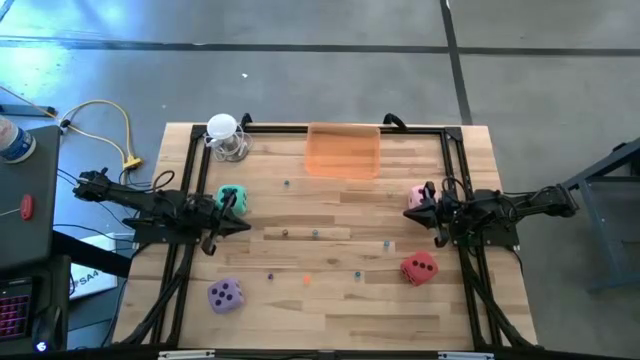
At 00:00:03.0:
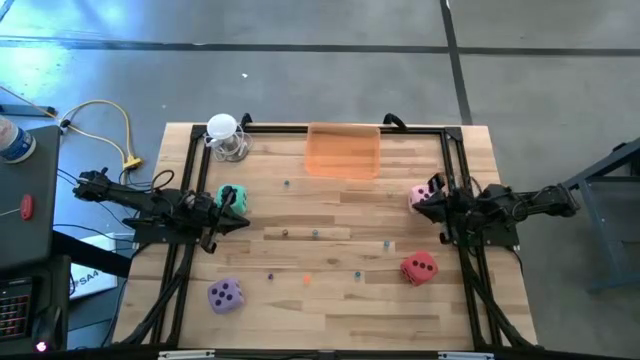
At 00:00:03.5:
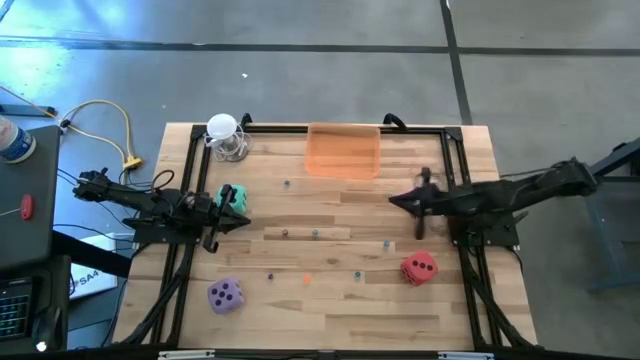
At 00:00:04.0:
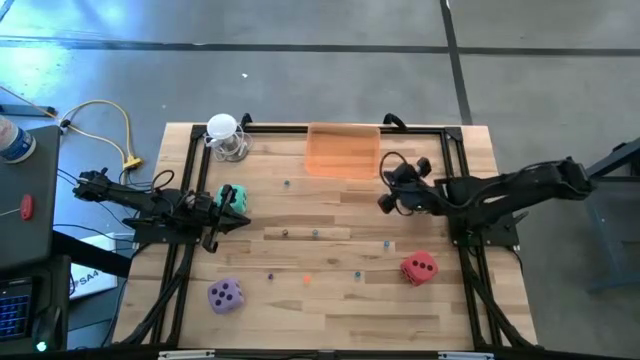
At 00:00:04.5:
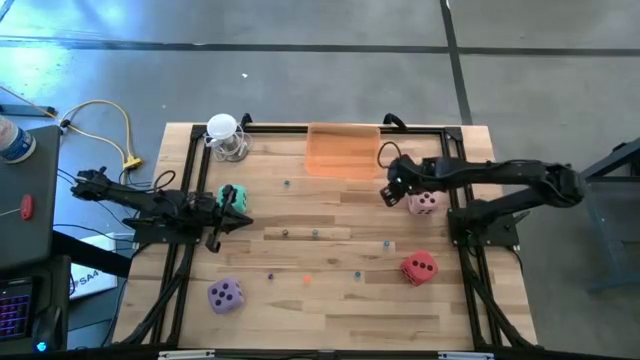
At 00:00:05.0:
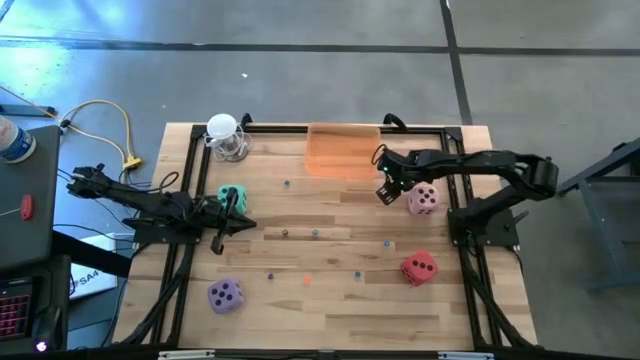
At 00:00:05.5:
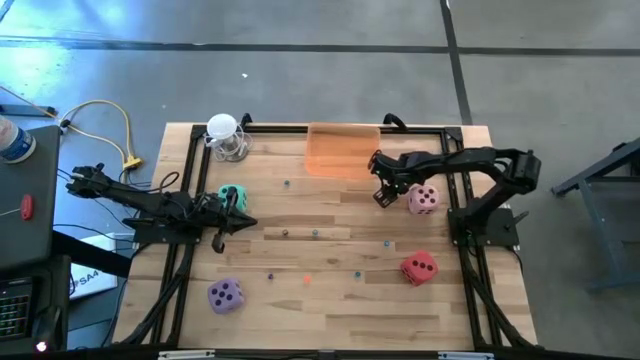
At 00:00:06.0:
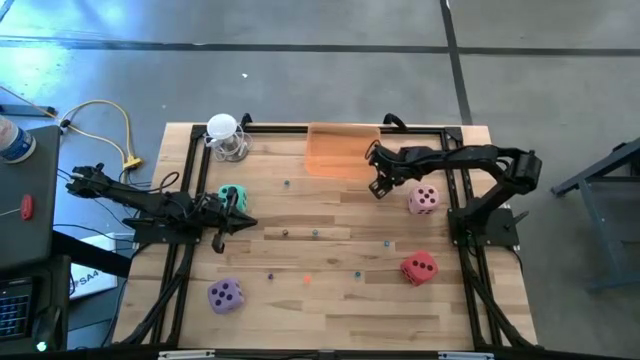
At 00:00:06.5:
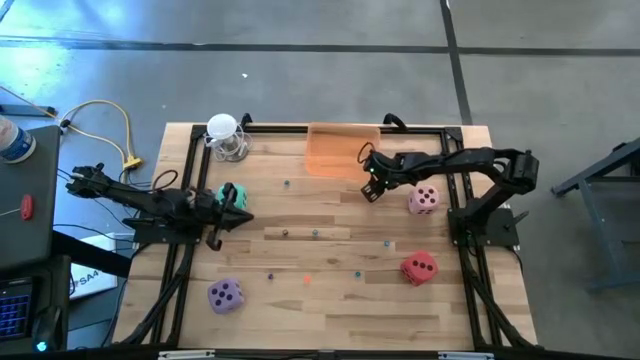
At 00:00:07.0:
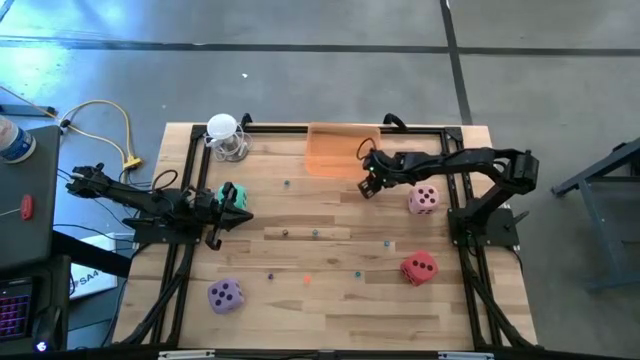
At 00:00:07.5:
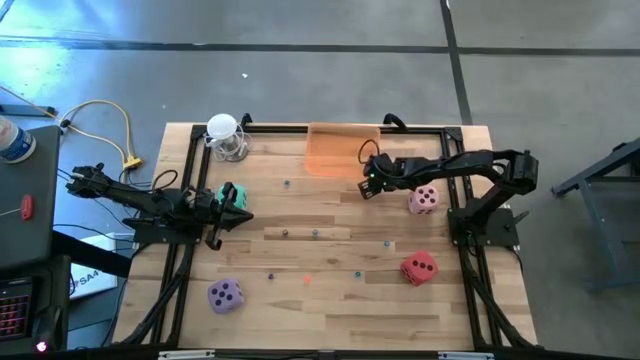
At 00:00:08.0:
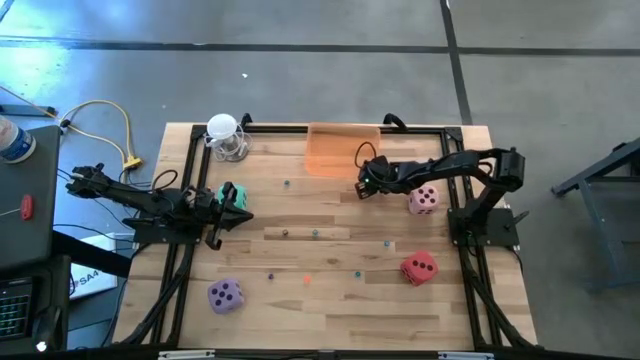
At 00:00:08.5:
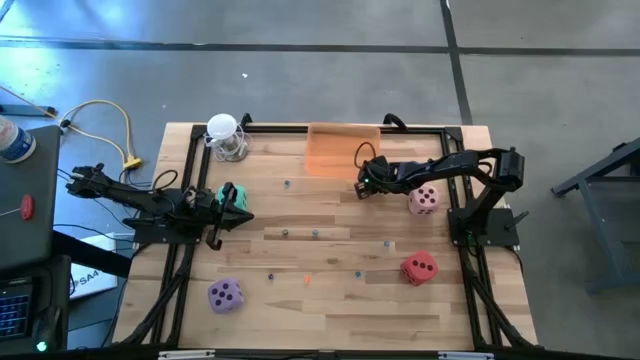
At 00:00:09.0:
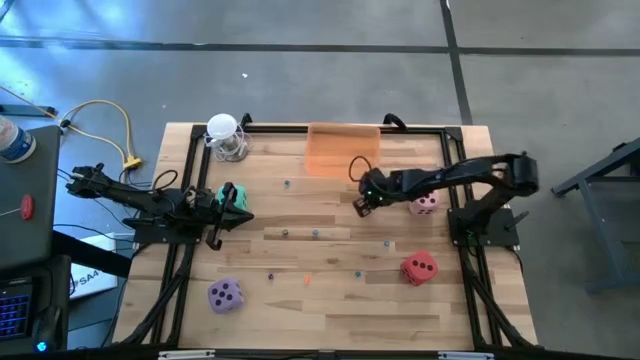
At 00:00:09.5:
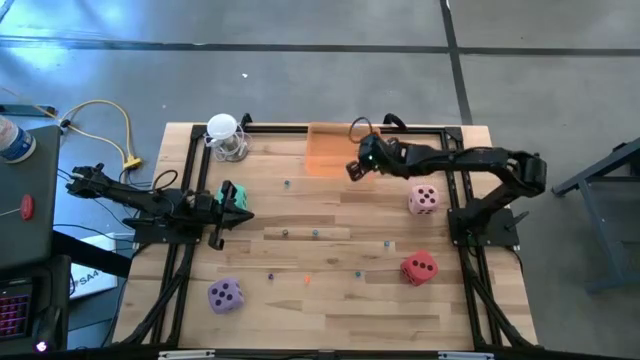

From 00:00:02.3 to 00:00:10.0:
Task: Pick & Place Dice
Put the green die into the orange bin

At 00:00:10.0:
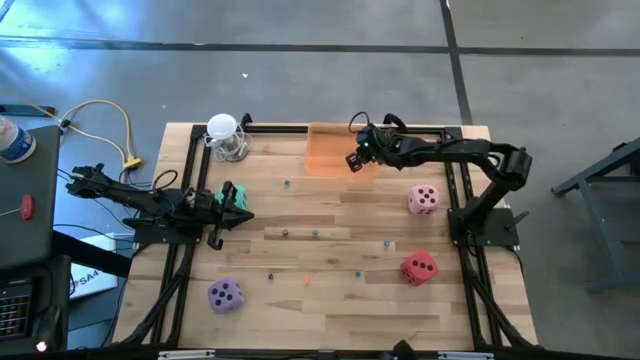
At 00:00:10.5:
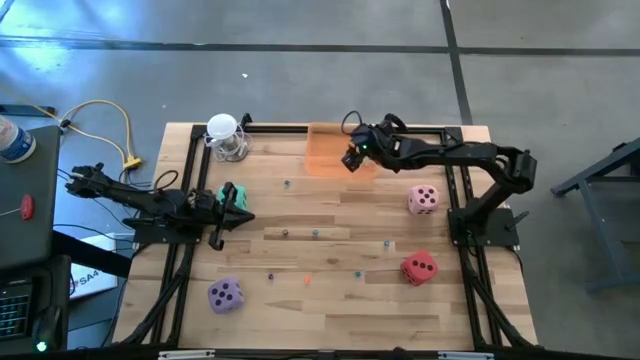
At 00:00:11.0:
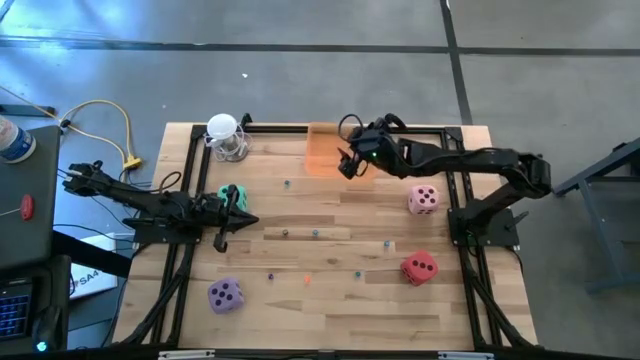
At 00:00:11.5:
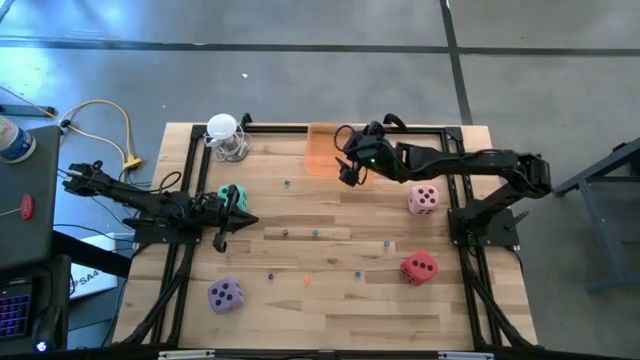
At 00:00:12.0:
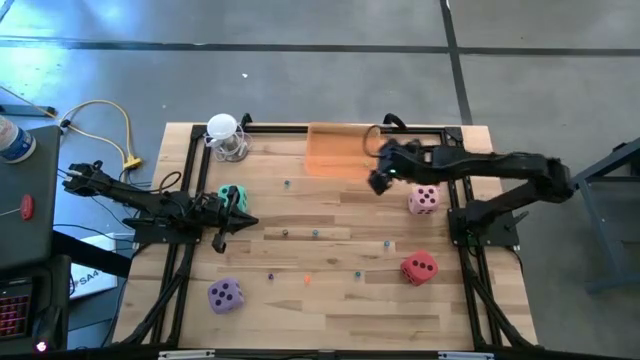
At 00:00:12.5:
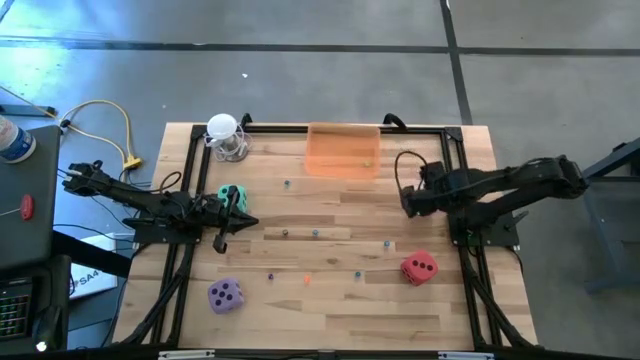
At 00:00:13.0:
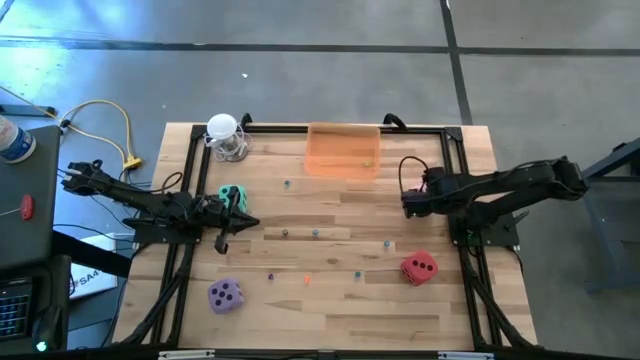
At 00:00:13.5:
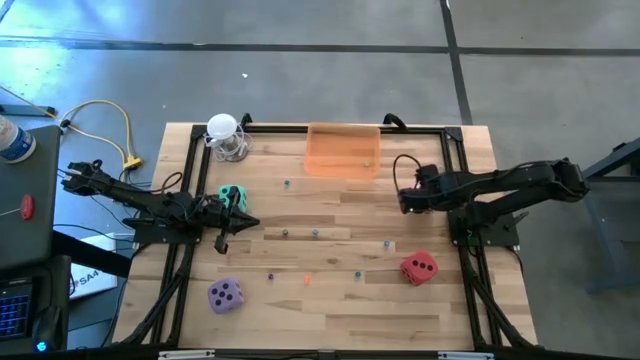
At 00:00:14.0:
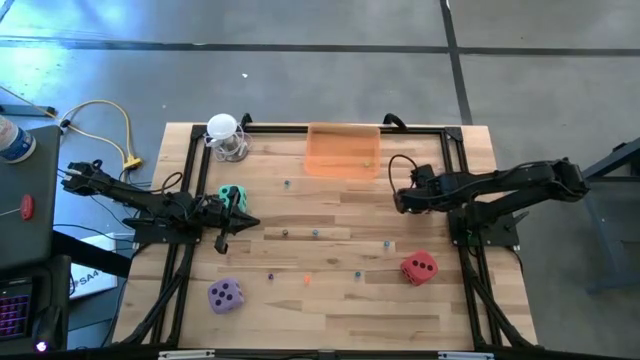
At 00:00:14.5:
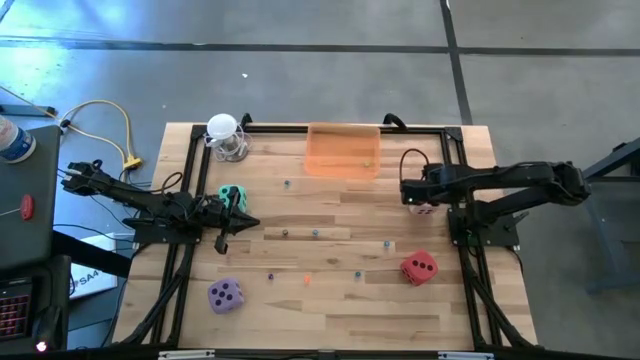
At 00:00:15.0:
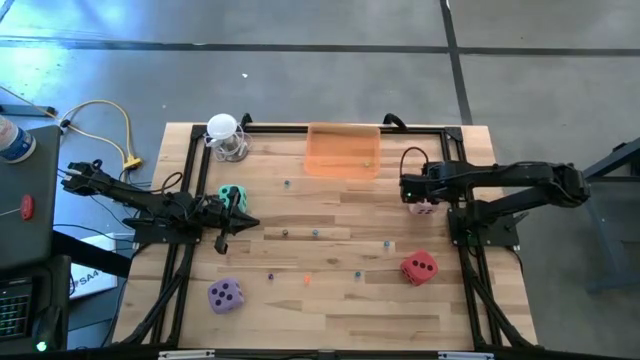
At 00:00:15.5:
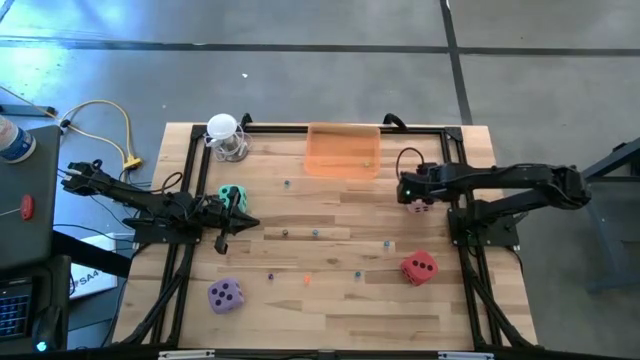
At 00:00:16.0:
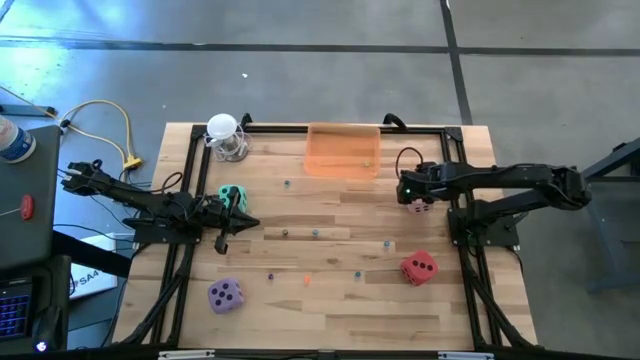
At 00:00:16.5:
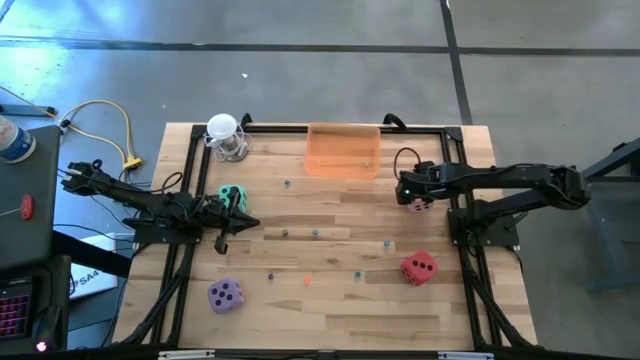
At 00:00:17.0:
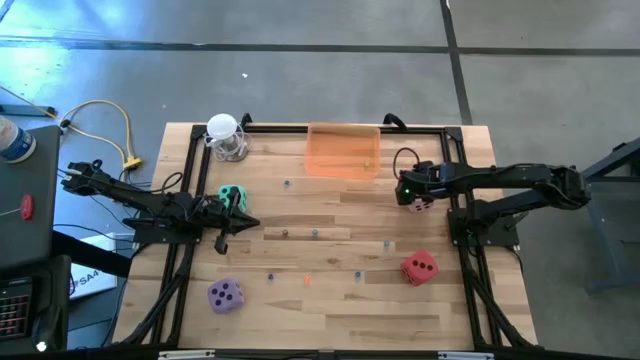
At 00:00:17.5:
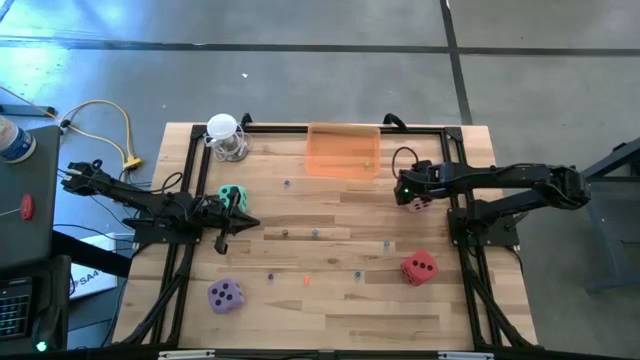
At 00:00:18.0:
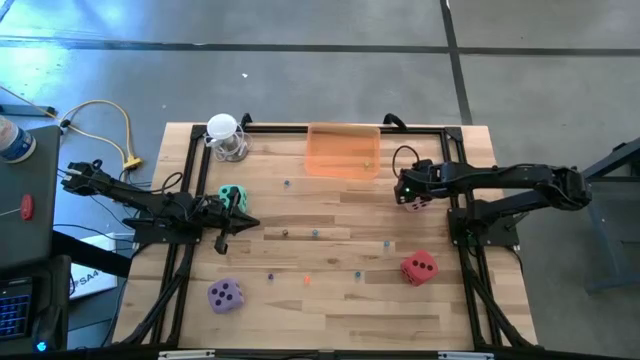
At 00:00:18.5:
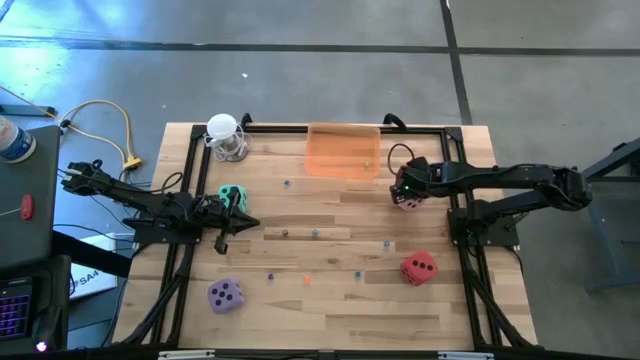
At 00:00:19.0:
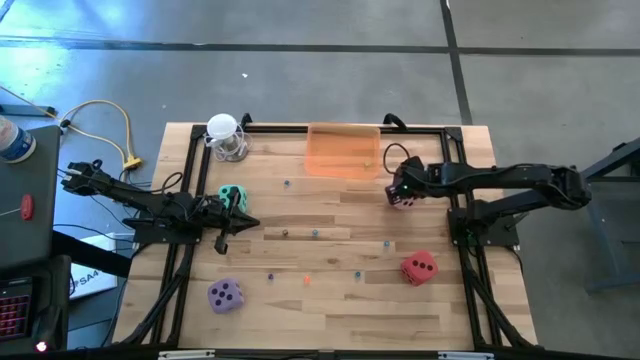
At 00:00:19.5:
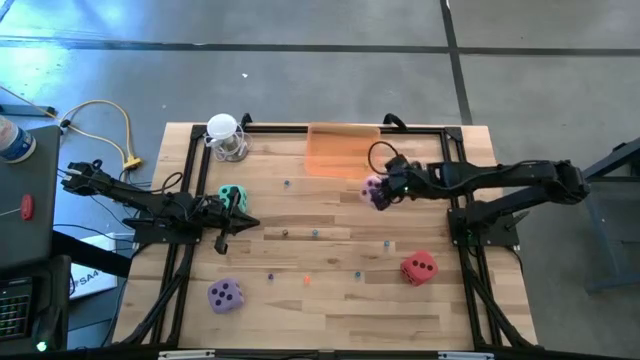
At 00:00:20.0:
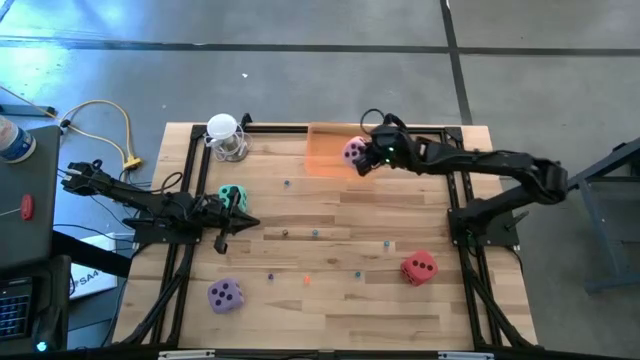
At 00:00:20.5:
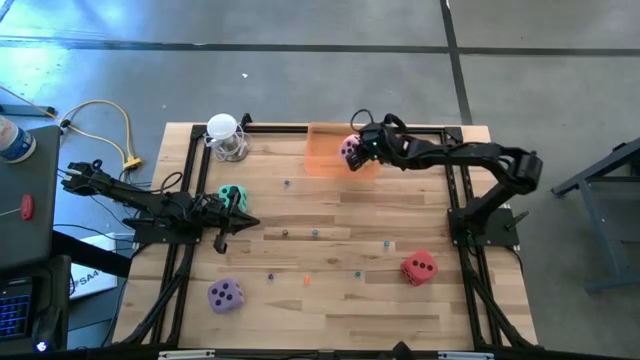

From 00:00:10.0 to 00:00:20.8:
Put the large pink die into the orange bin

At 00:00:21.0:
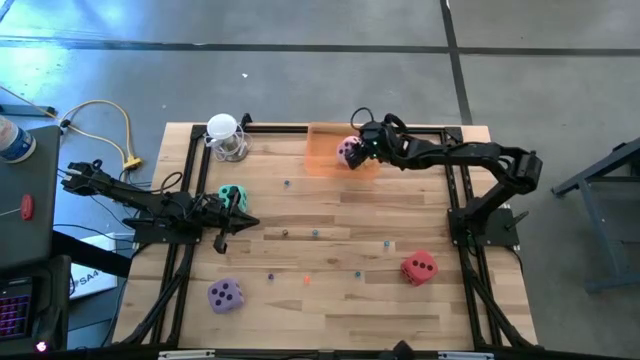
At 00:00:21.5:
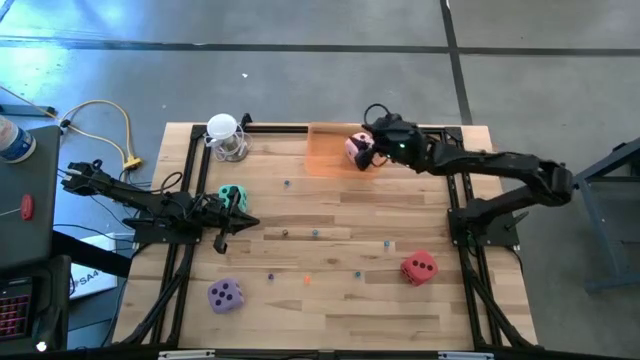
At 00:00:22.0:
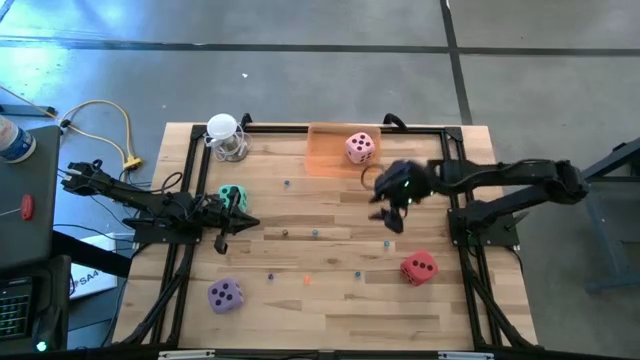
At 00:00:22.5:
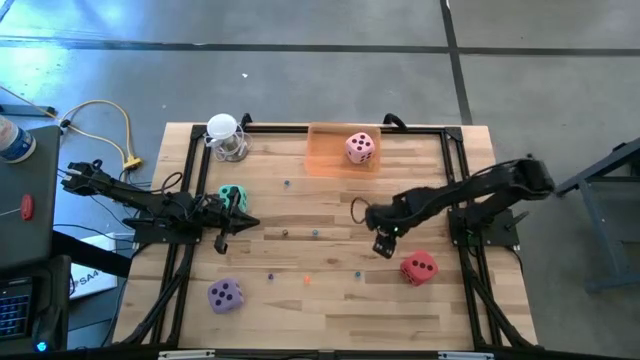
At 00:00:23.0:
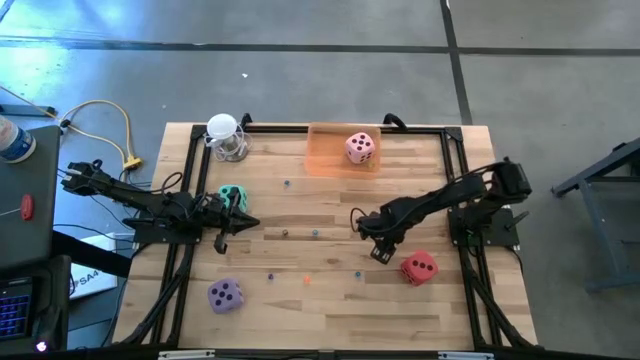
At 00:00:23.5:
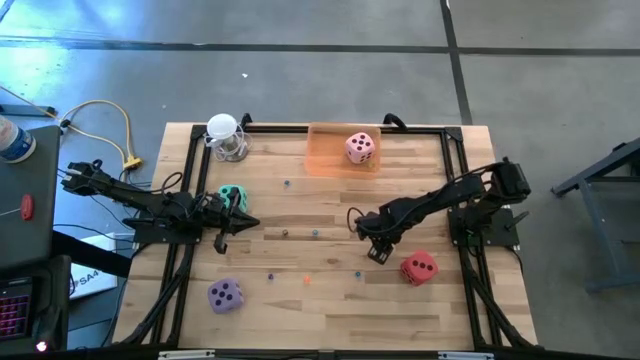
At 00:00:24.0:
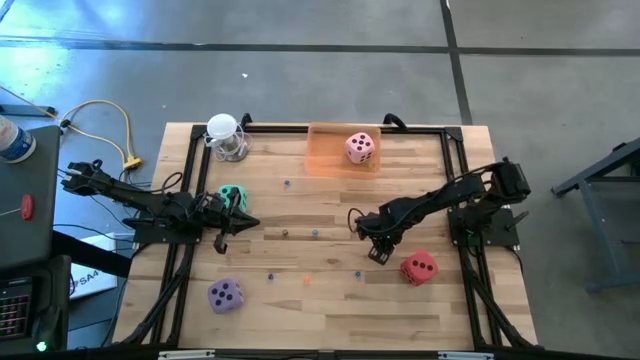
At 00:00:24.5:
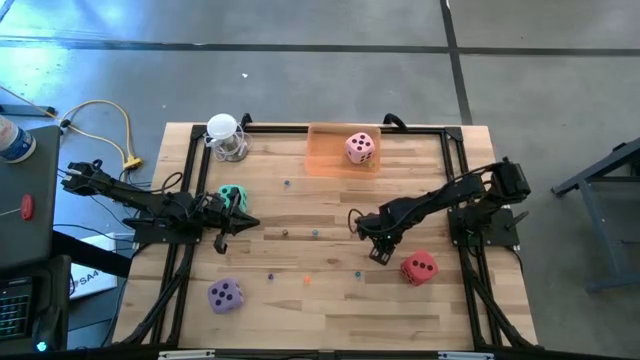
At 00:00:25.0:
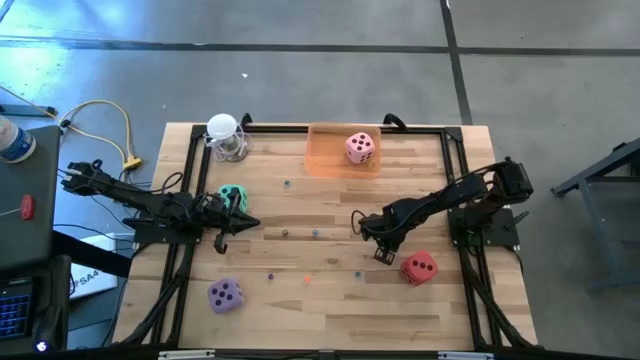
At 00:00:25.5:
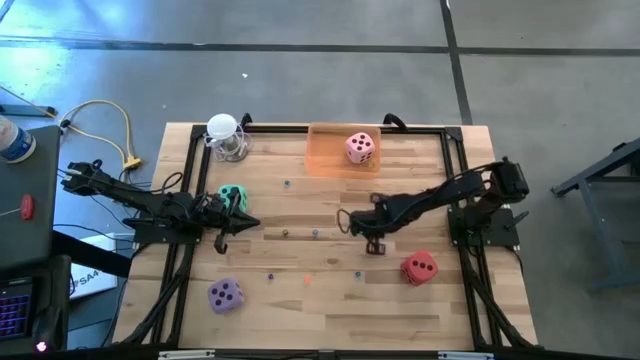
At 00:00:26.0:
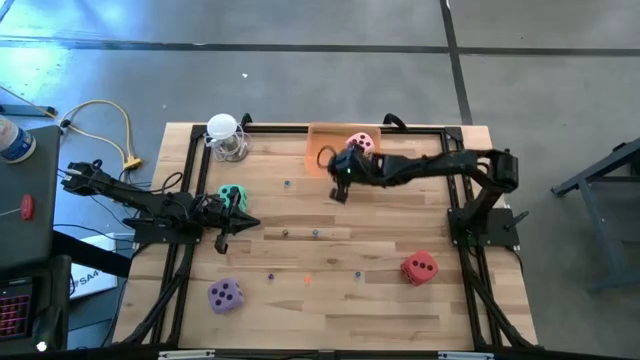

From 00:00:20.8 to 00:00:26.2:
Put the blue die into the orange bin
